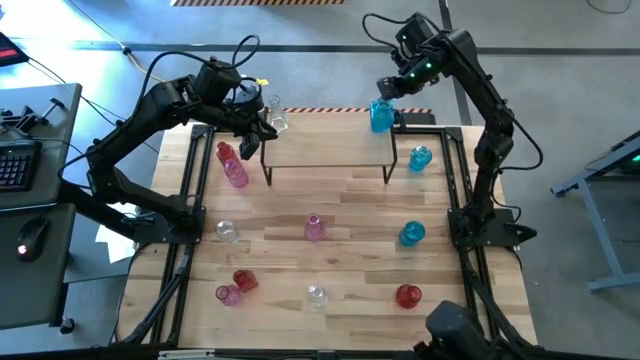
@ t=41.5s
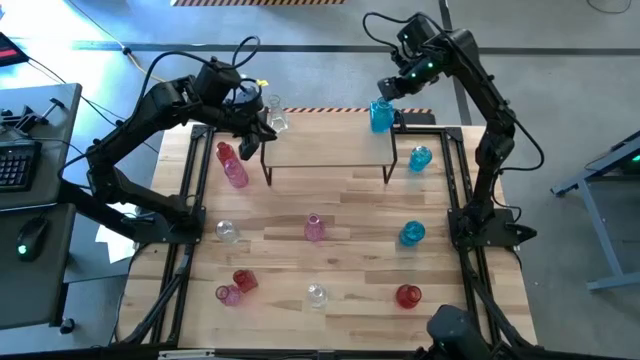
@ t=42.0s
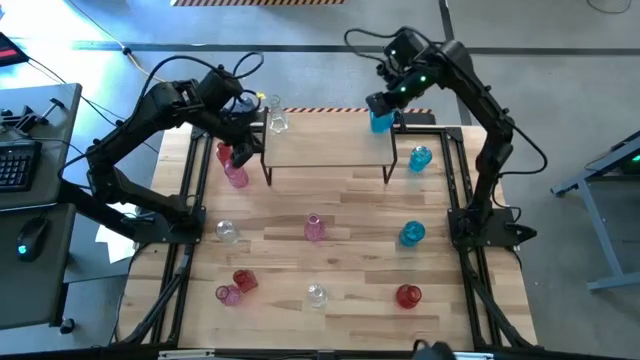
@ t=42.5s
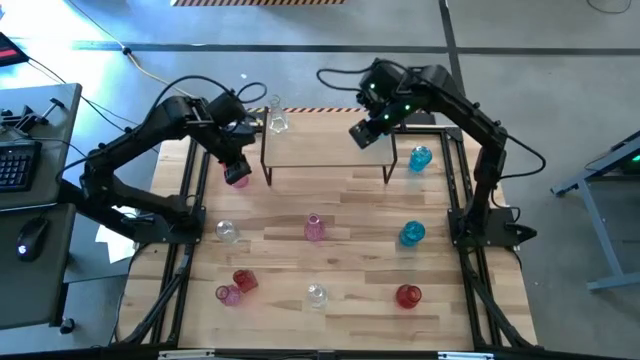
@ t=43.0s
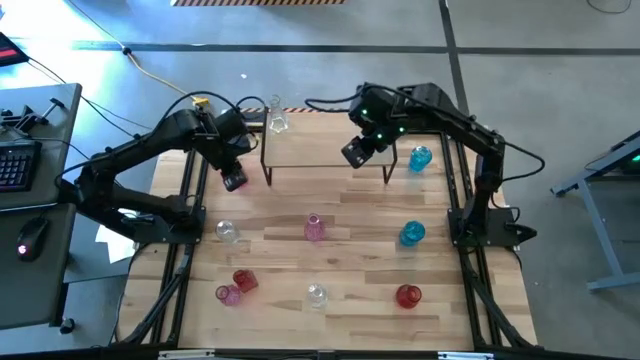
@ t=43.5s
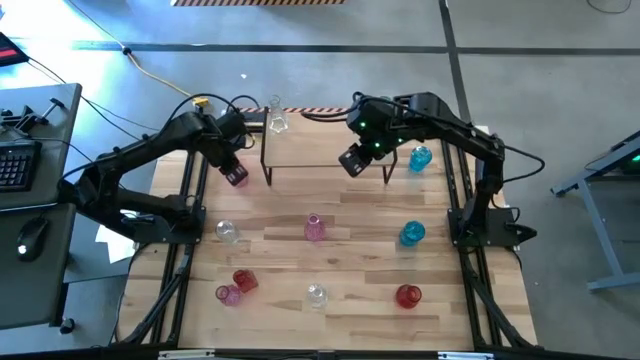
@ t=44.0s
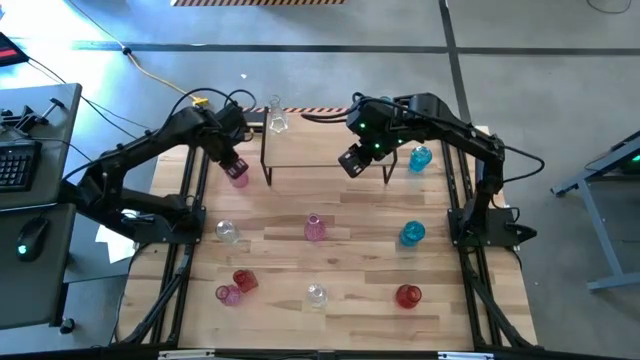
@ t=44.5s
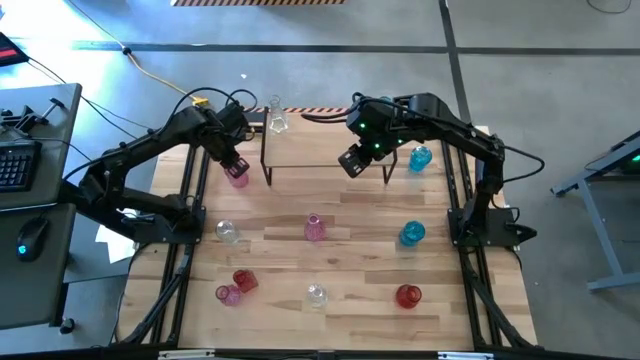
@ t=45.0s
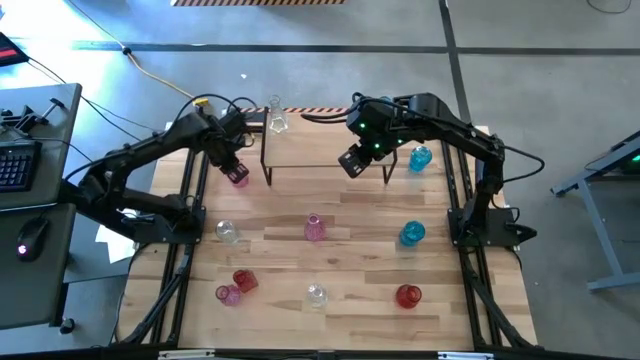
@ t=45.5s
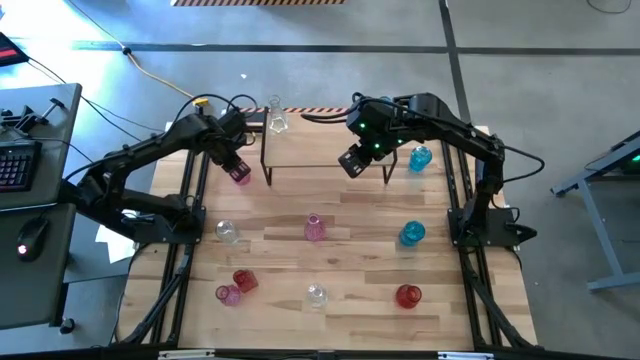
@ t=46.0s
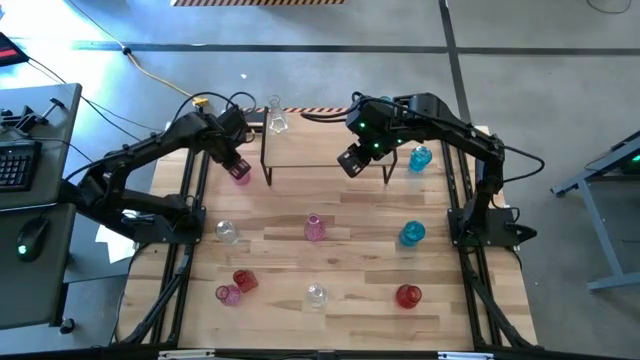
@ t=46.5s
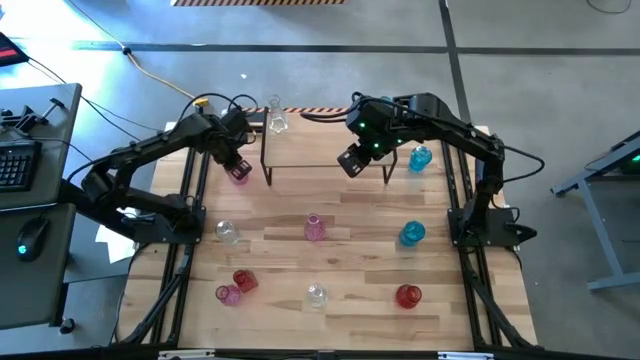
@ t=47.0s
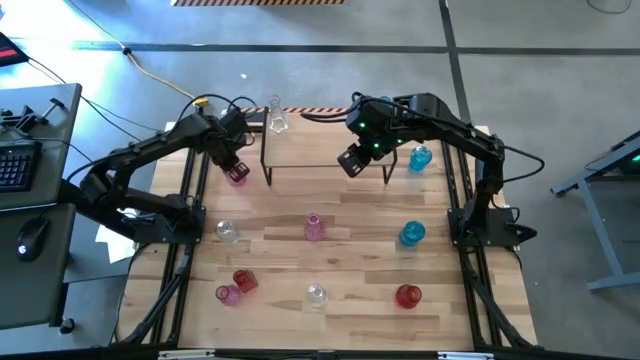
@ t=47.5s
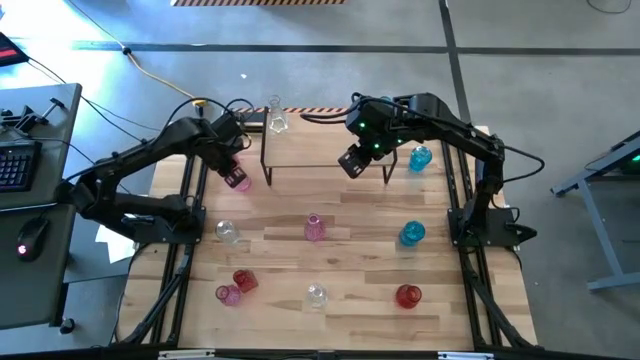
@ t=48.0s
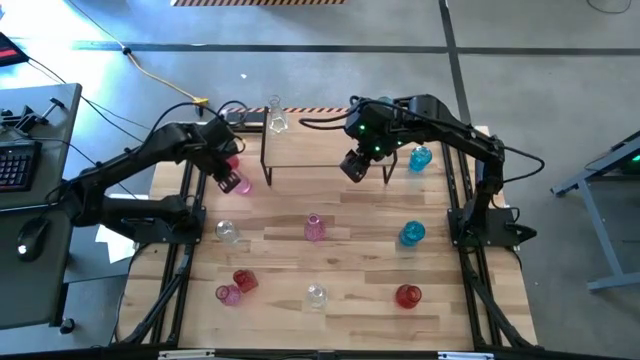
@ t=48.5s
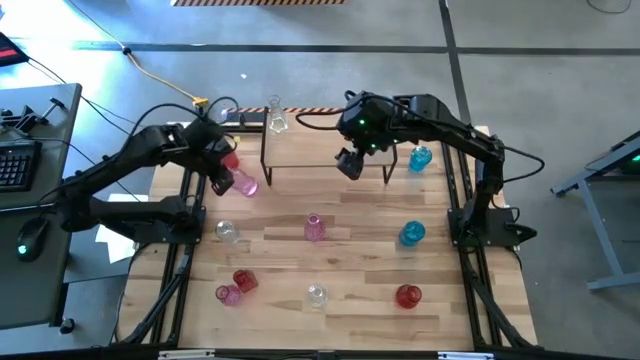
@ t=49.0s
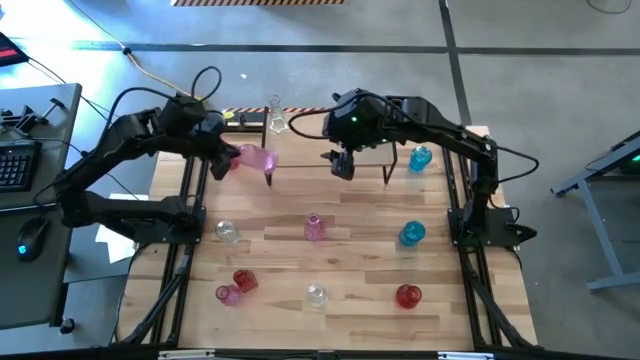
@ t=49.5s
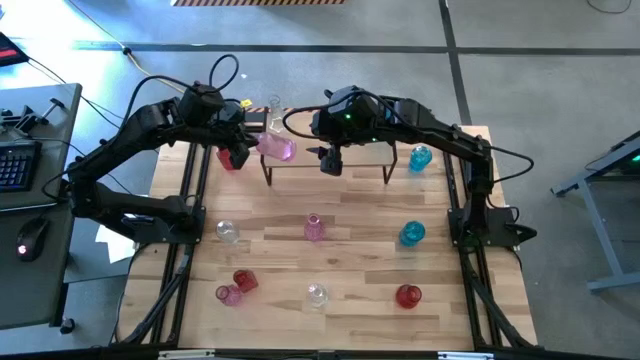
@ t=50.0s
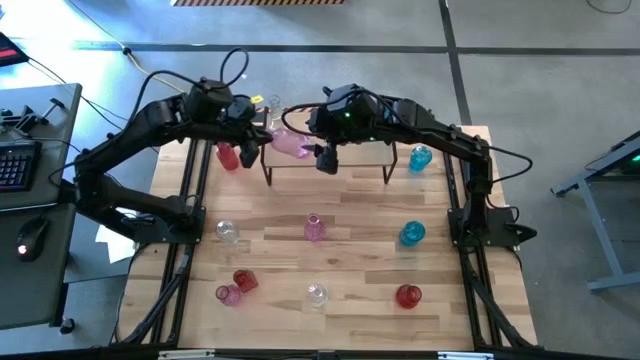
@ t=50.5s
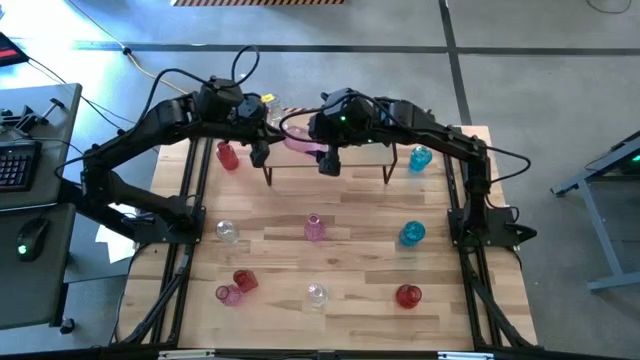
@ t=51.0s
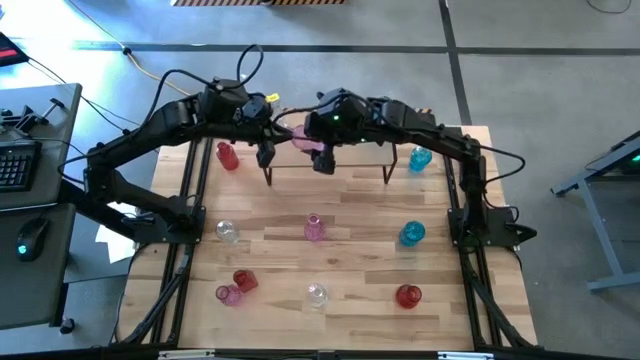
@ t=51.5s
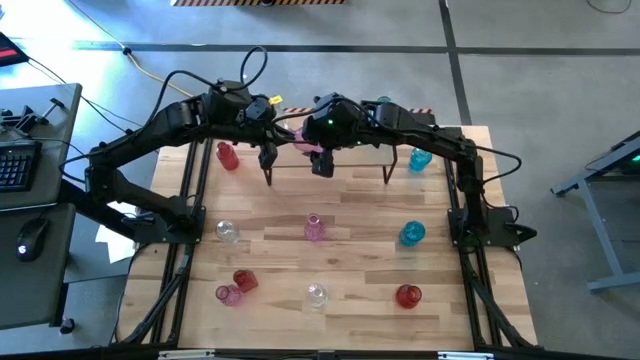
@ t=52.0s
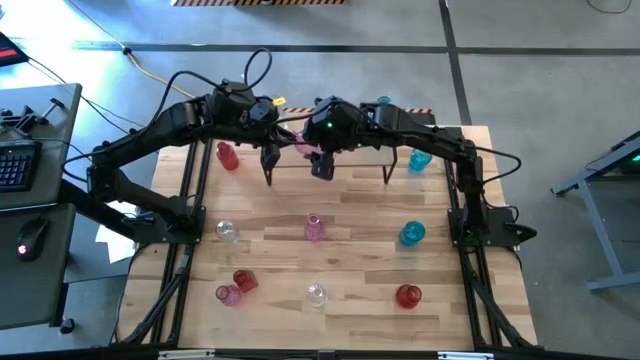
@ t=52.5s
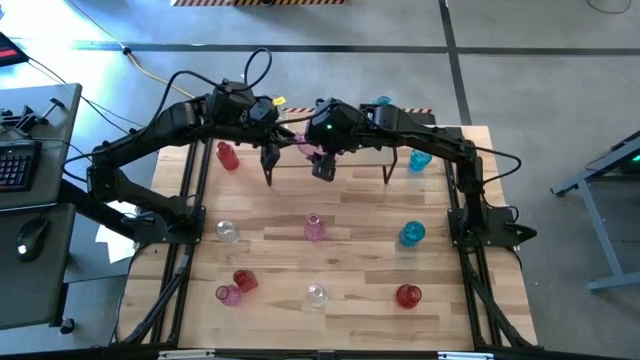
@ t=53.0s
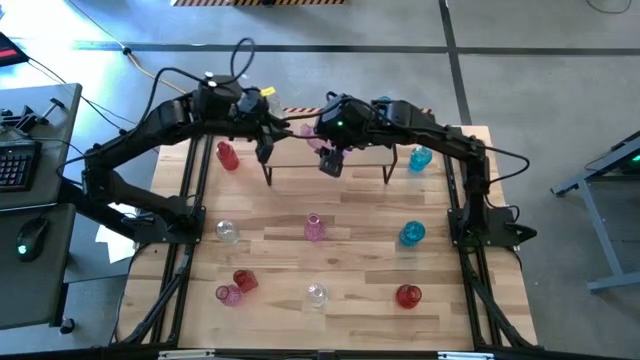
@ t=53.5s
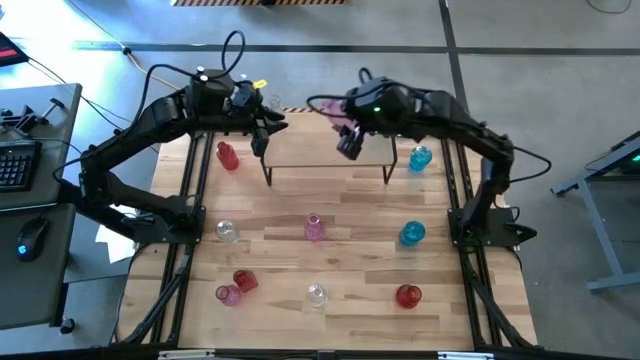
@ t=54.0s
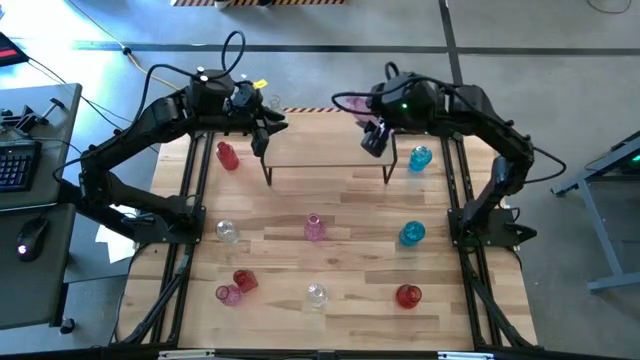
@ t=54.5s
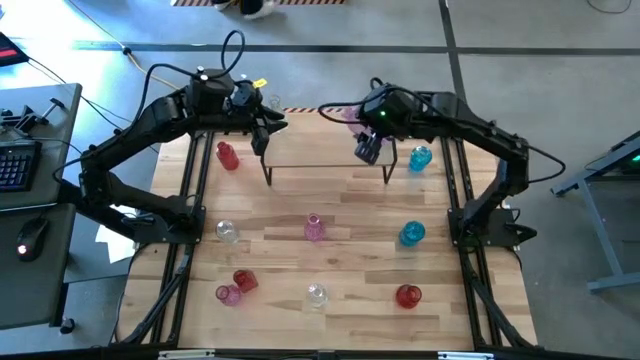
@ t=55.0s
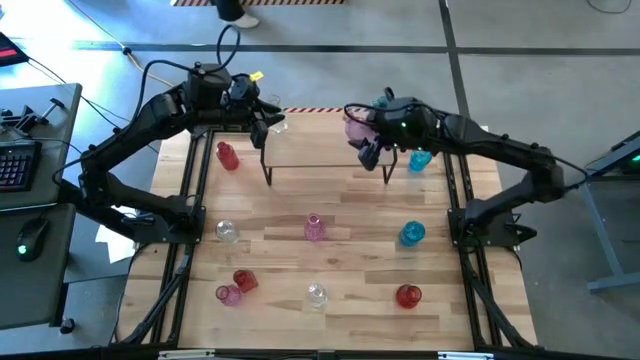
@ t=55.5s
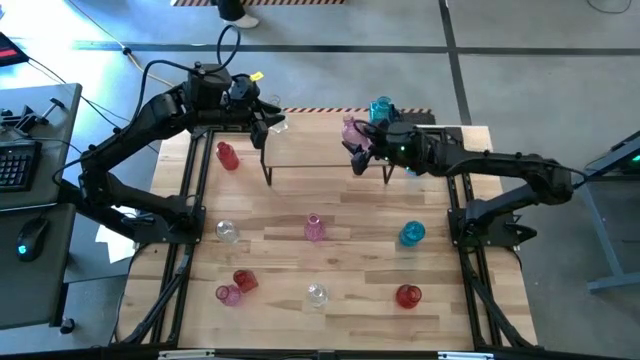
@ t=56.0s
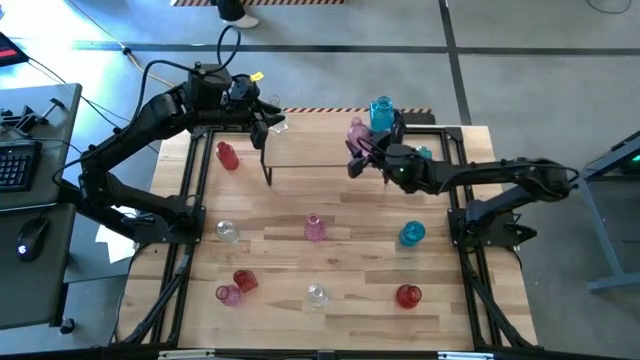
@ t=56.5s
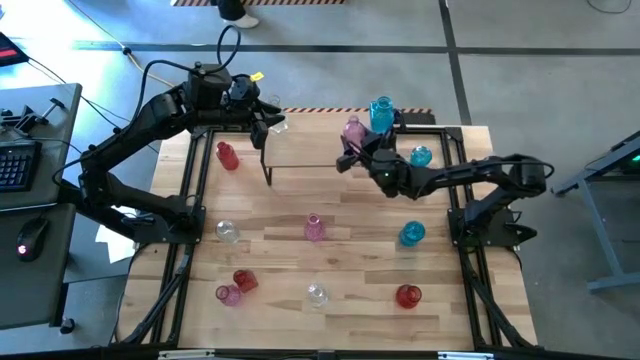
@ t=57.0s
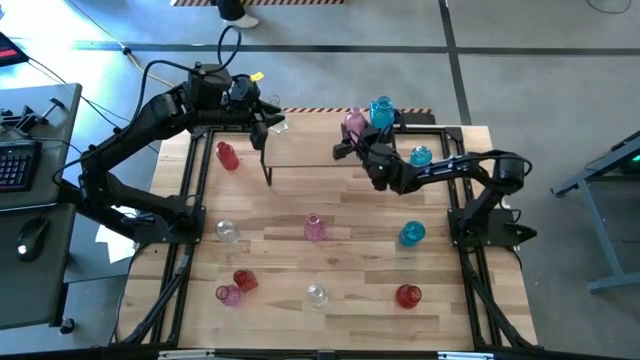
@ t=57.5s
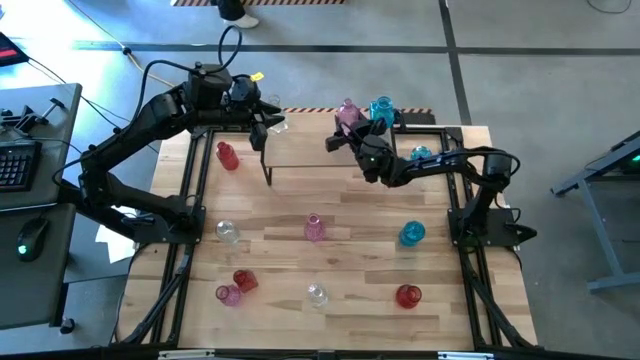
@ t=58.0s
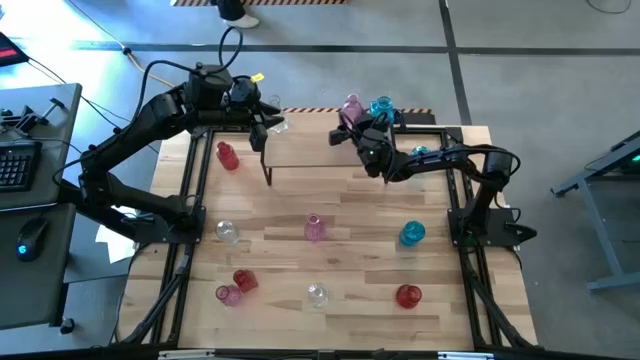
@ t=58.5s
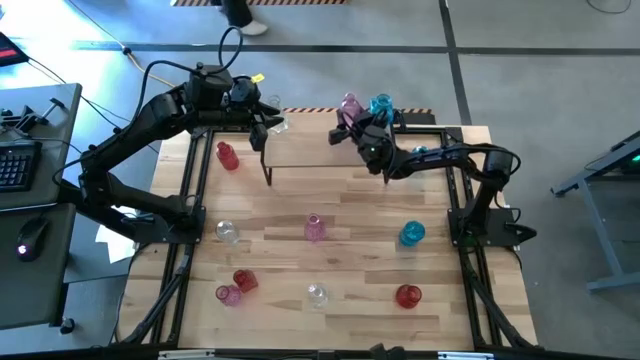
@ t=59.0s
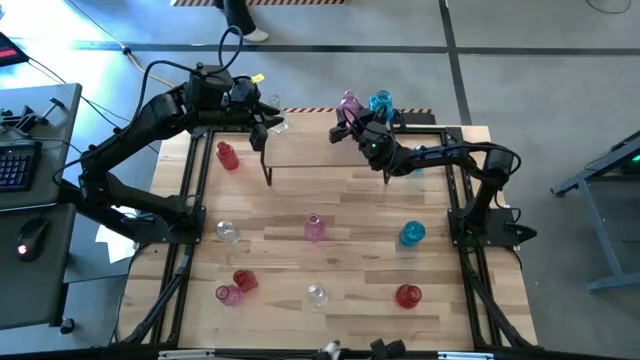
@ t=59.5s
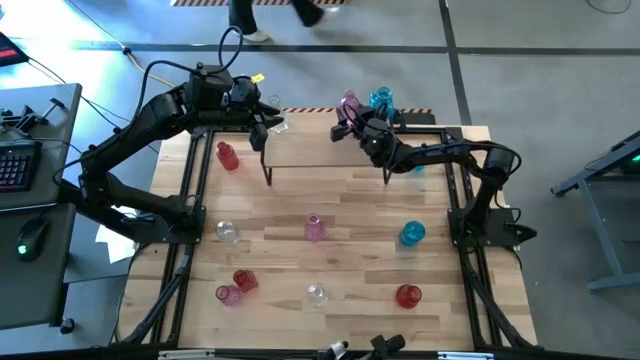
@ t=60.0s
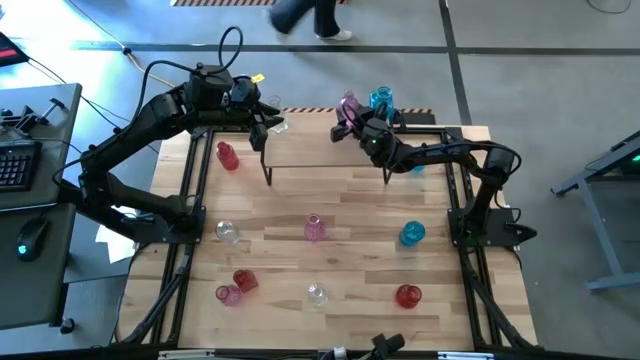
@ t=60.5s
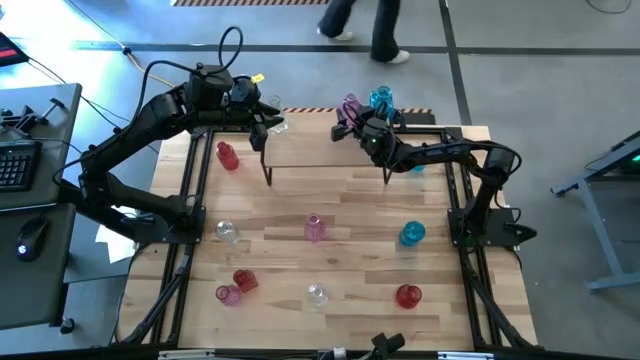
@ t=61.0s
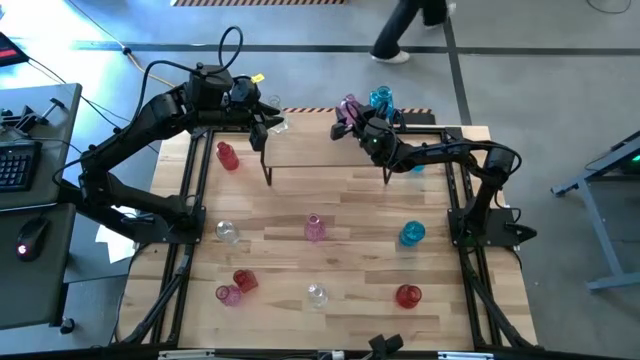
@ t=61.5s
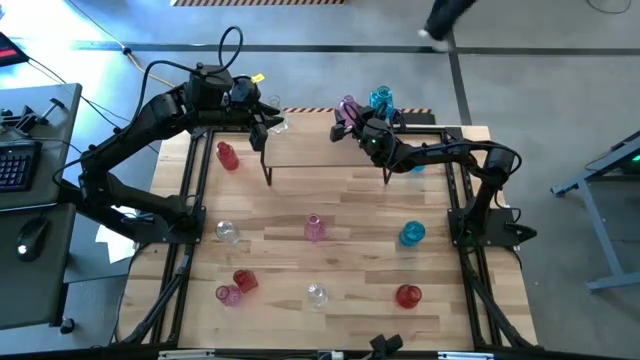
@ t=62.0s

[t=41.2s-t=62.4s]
Task: sort vases onto shelf
Put the top pink vase on the shelf
